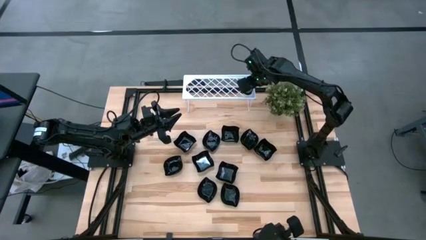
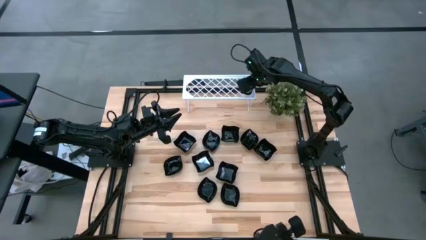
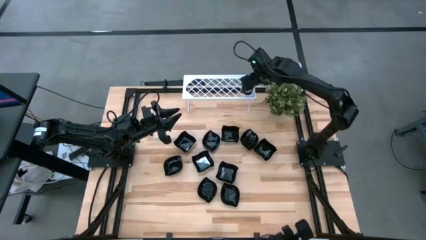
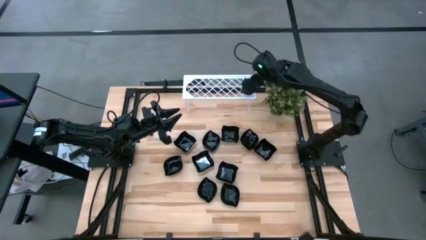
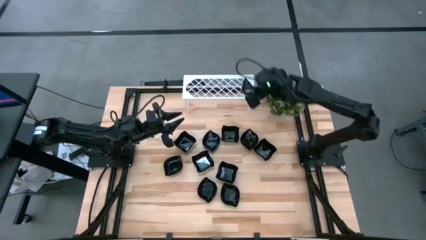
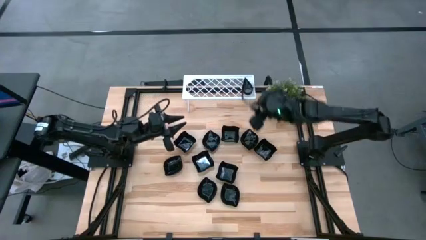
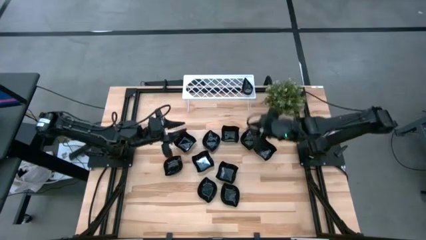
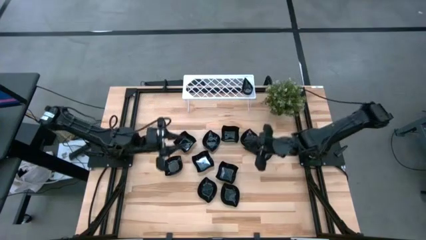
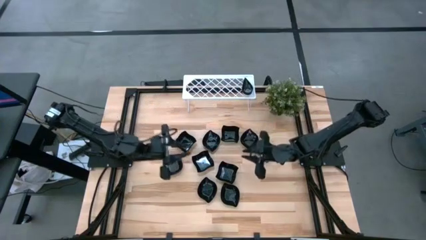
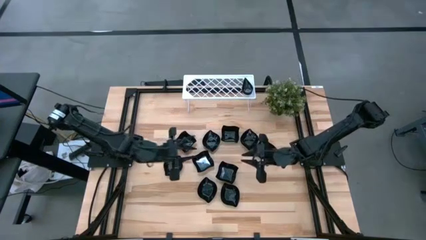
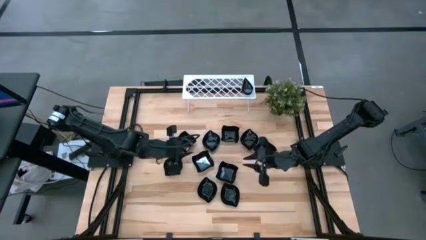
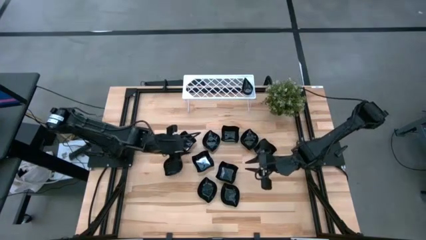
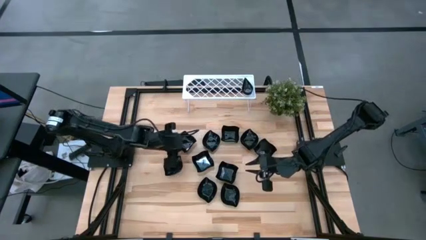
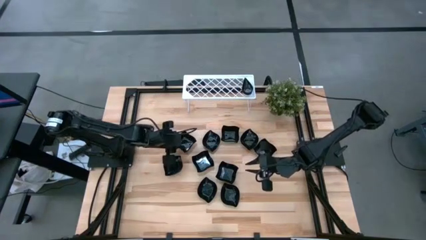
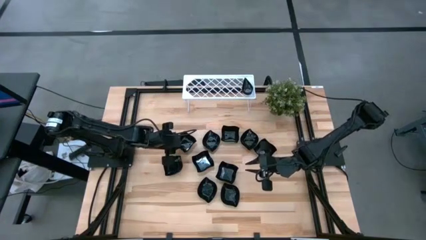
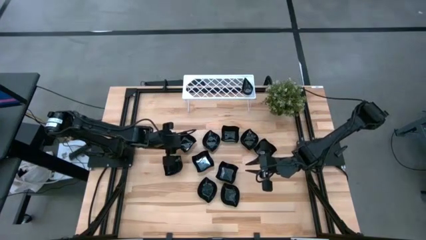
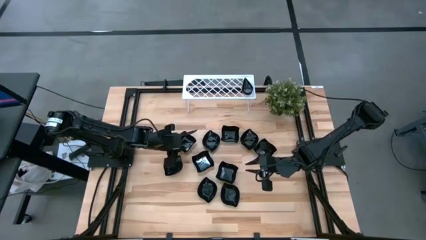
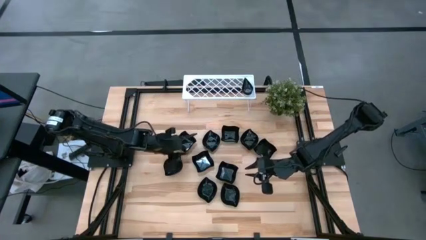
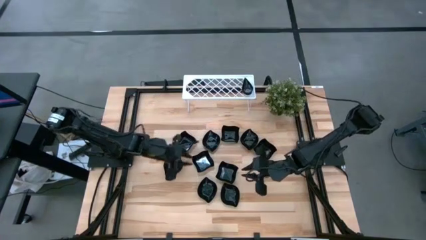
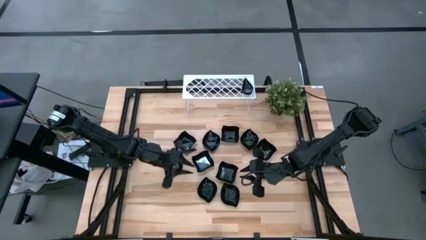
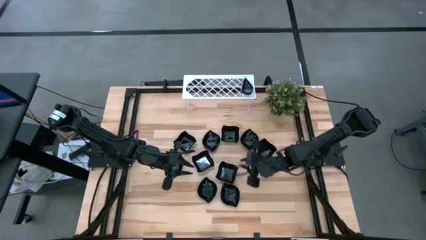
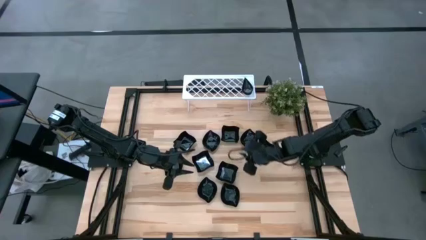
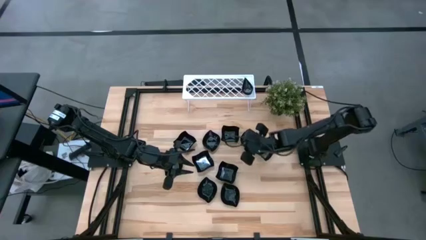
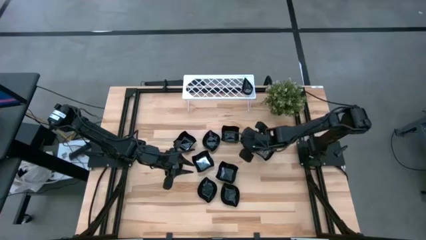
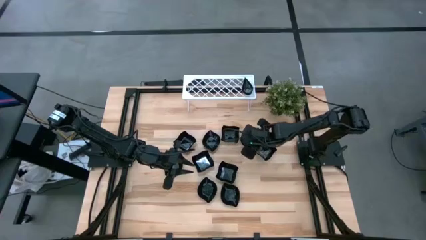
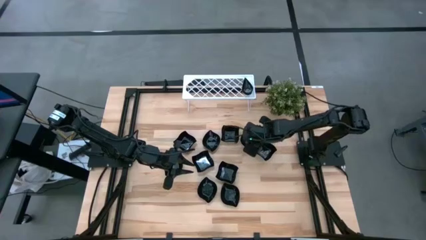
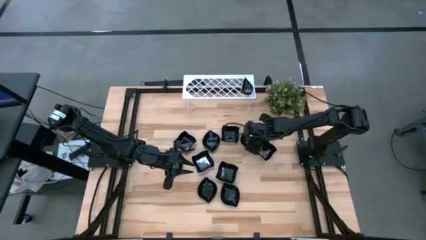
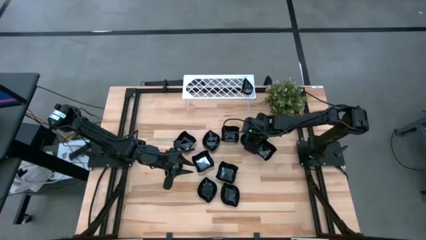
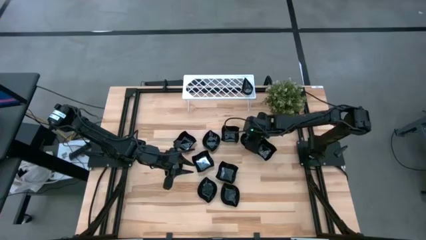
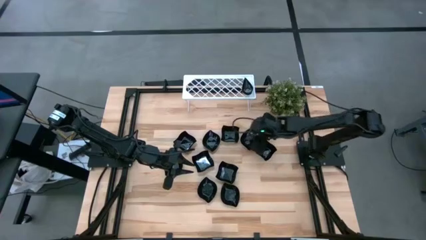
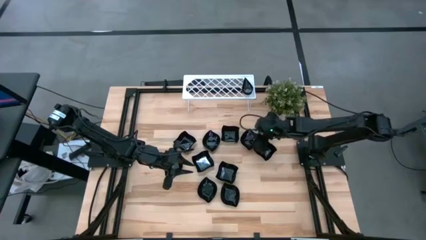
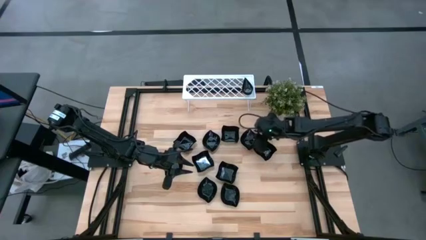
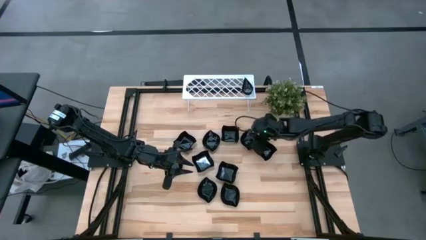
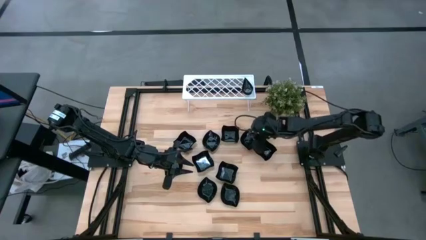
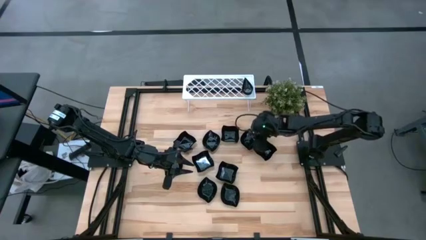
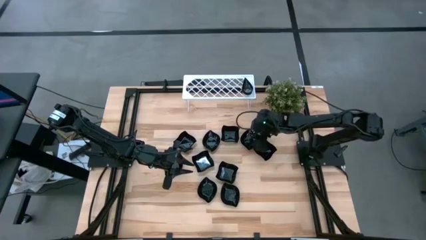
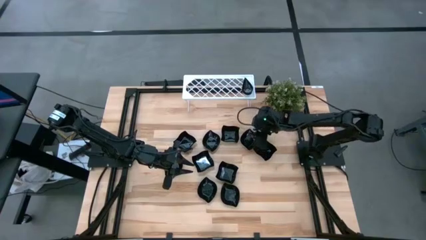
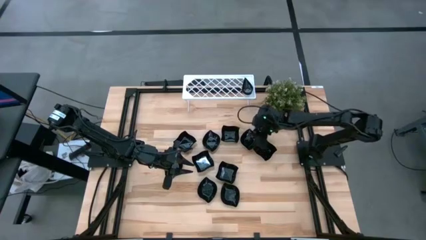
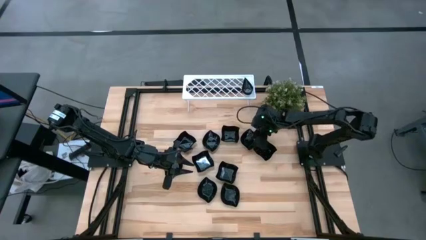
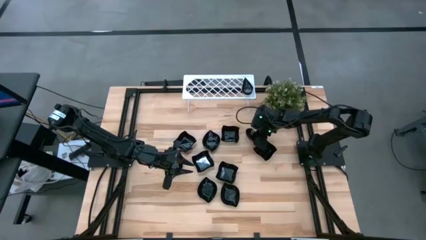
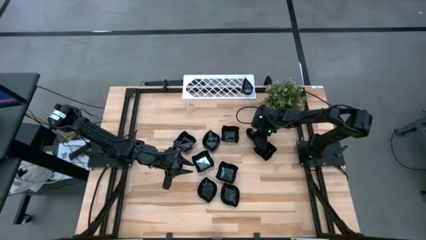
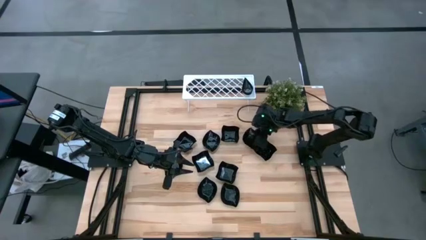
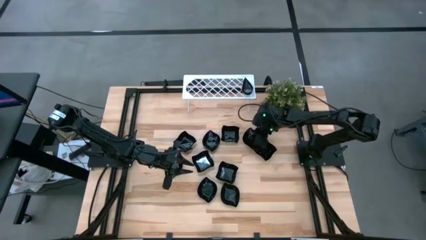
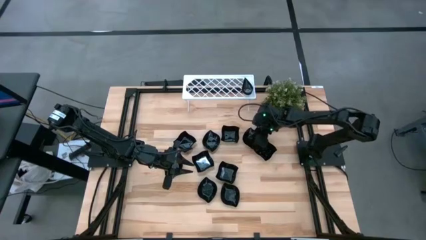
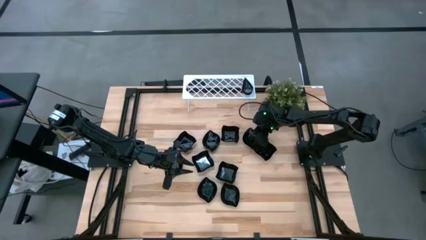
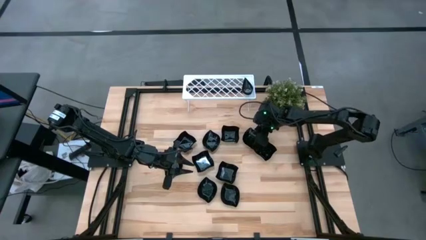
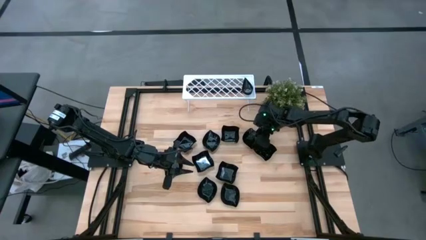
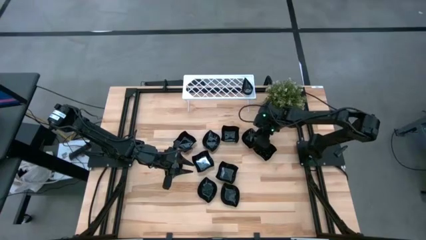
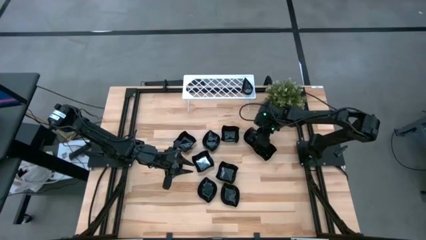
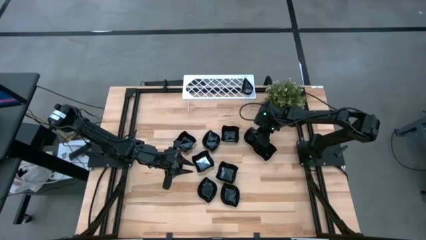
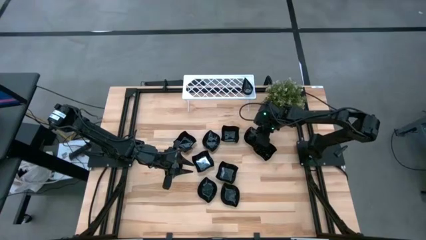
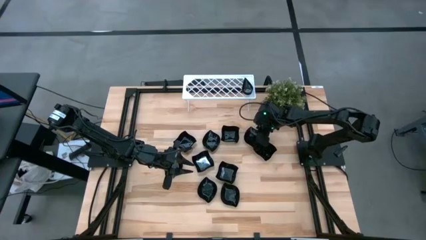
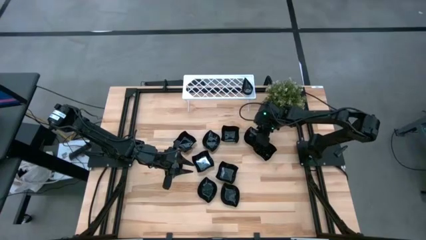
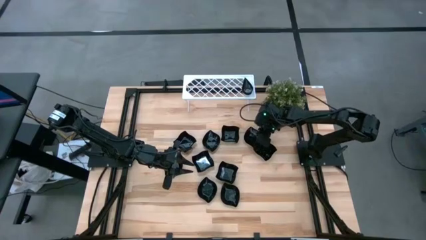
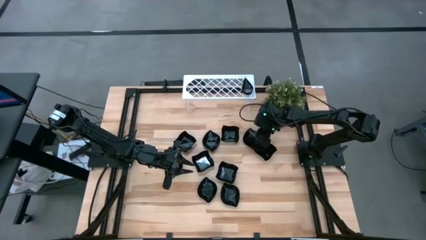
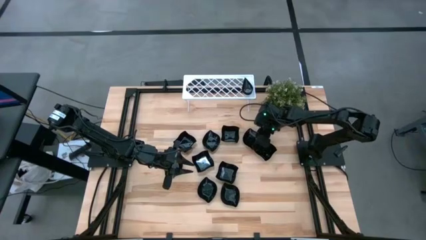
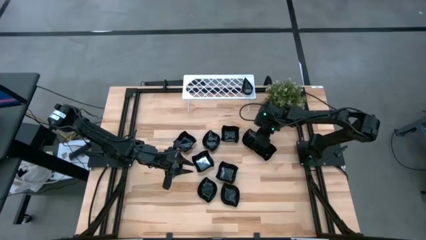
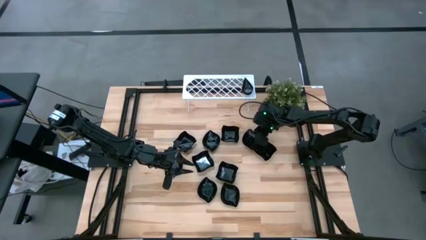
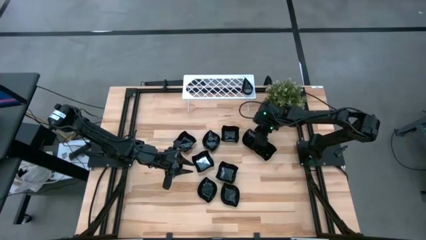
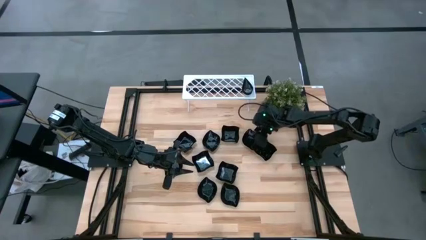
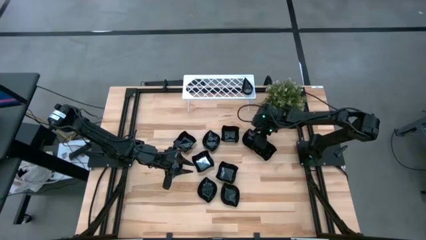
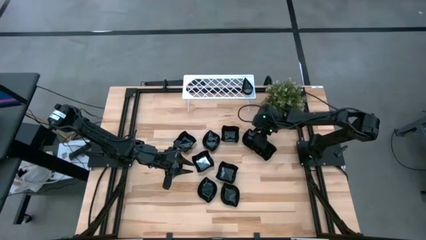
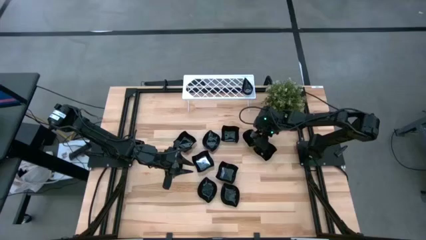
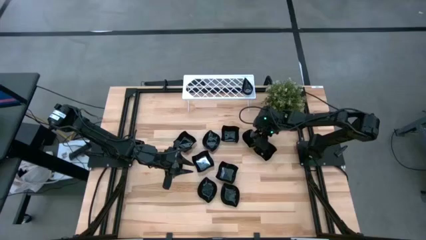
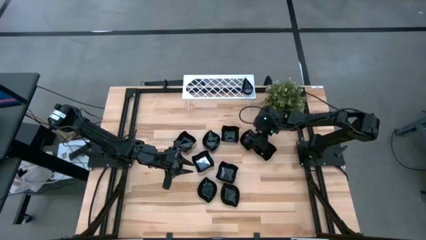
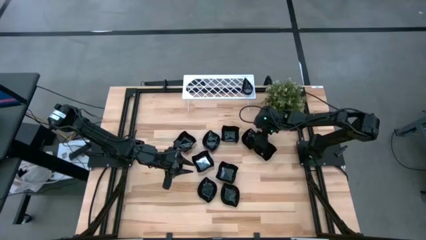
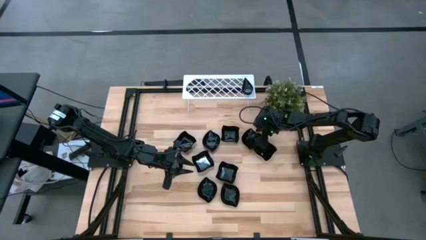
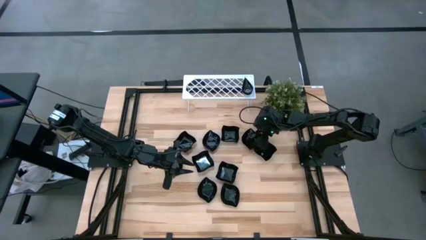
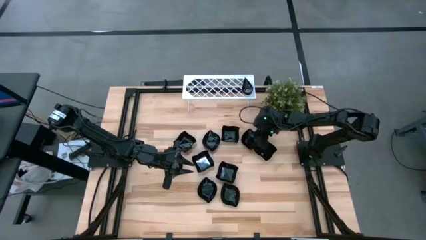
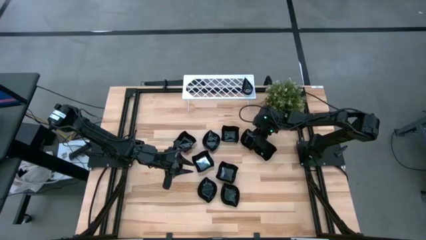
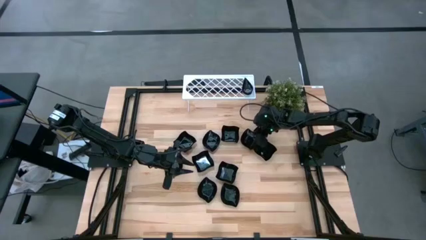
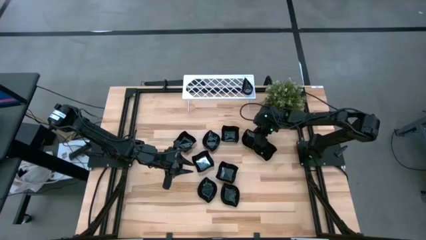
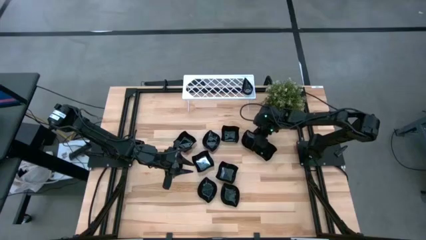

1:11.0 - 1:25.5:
Task: Pick & Place Mini shaped plates
Put the leaf shaped plate on the shelf

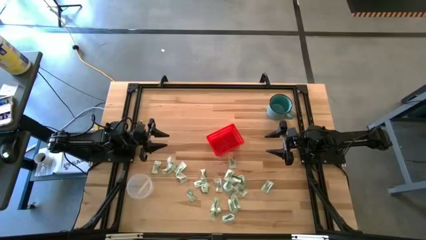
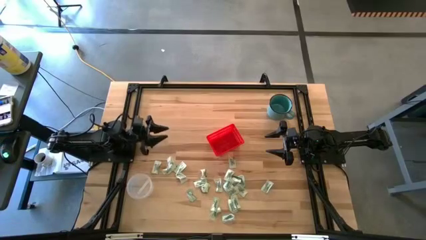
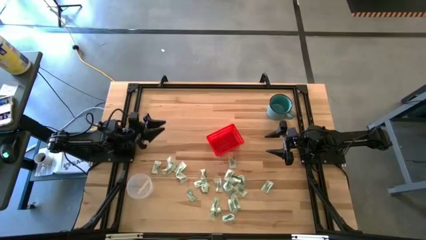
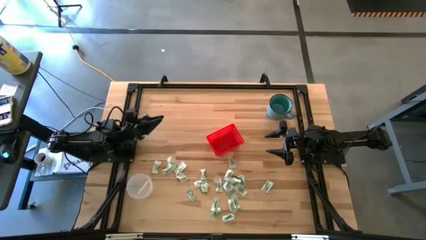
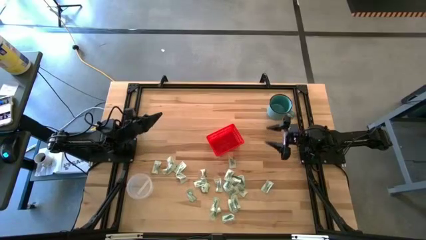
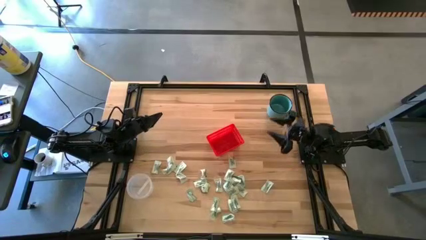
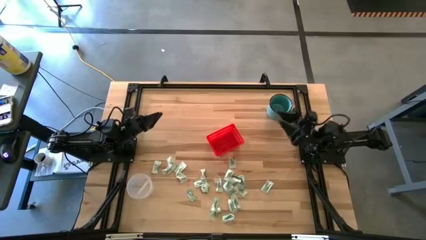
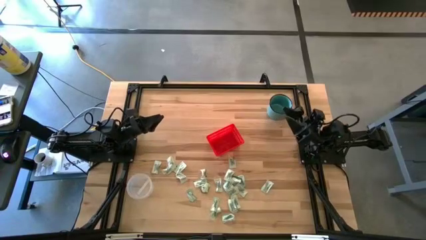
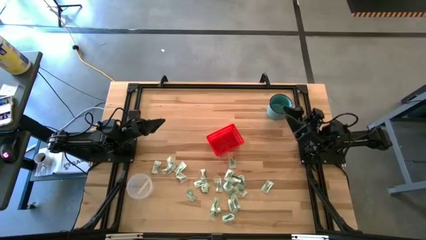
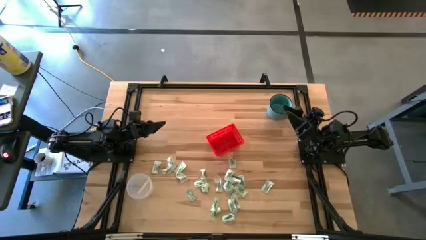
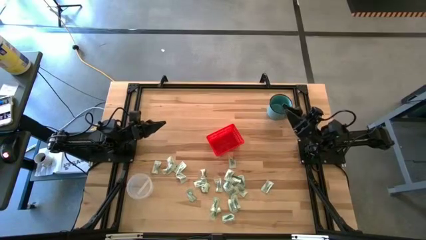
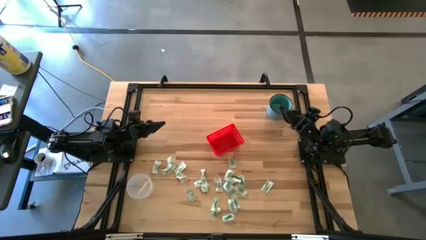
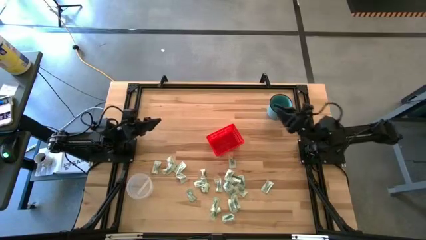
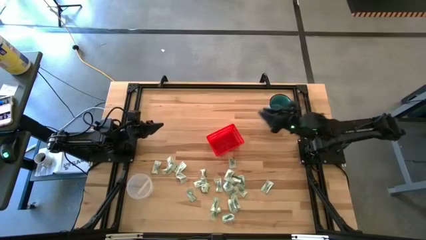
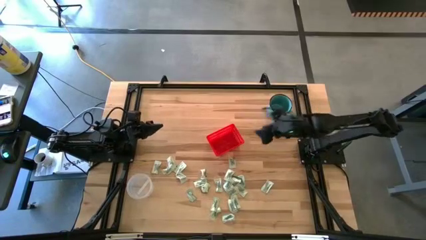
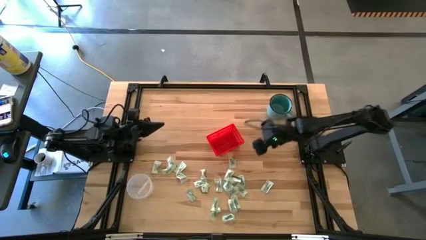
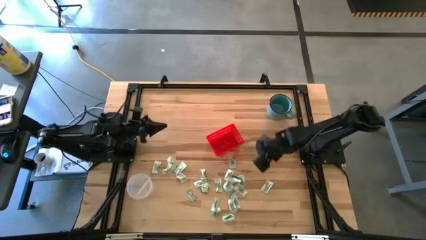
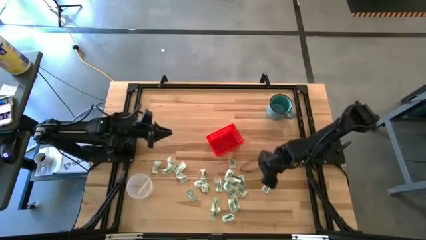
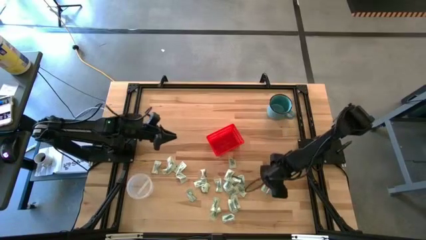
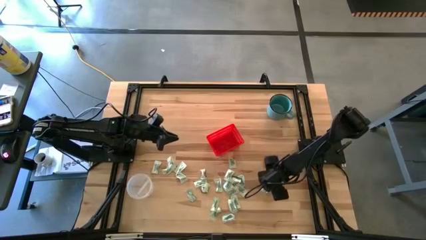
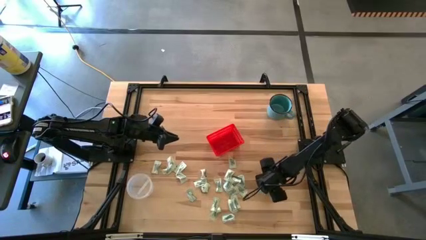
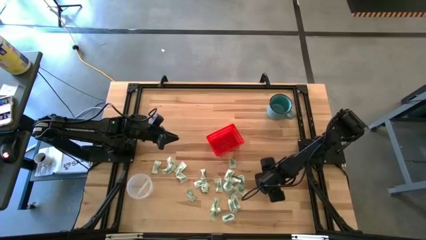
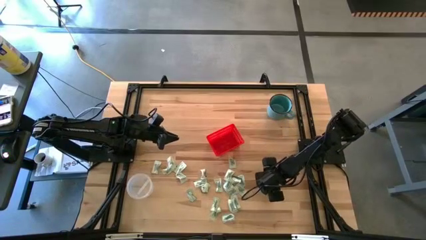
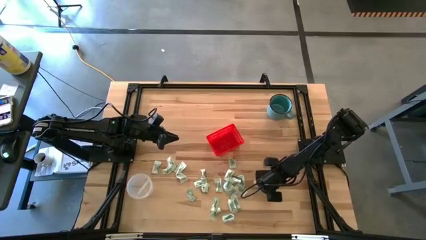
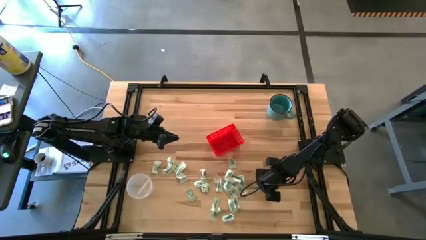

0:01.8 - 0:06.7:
Task: Pick and place items into bin
Put the stevia packet into the red bin
